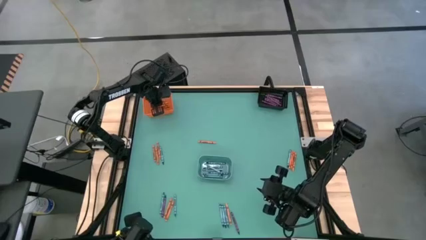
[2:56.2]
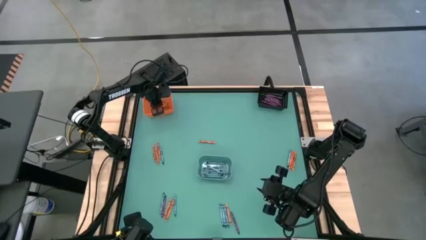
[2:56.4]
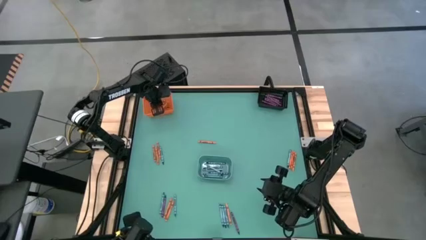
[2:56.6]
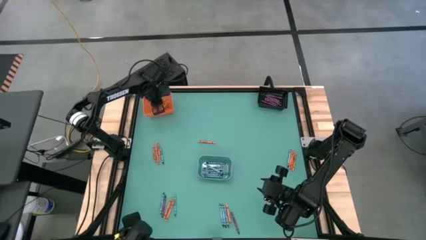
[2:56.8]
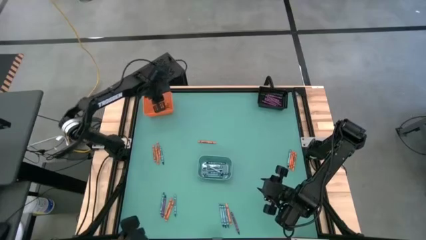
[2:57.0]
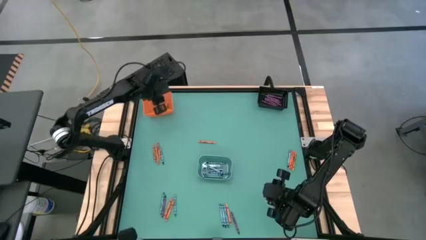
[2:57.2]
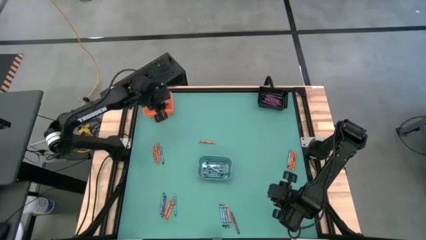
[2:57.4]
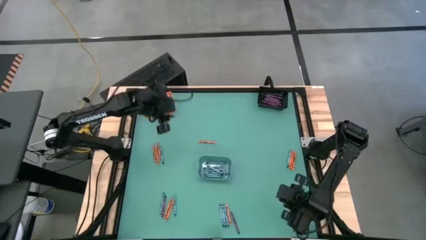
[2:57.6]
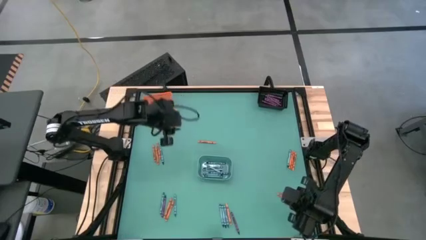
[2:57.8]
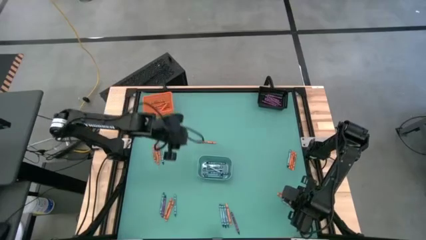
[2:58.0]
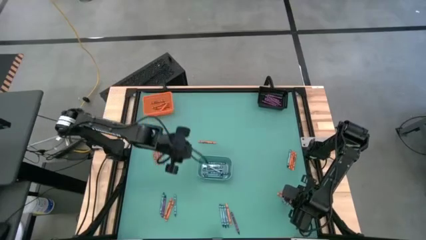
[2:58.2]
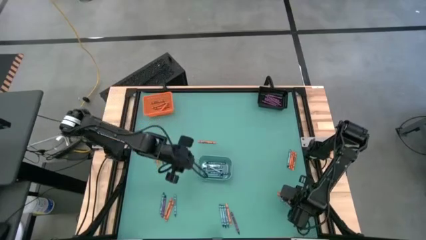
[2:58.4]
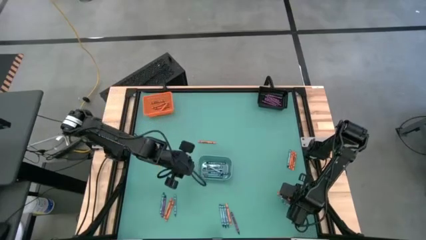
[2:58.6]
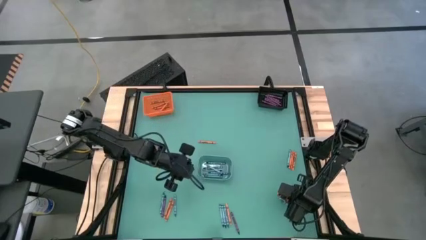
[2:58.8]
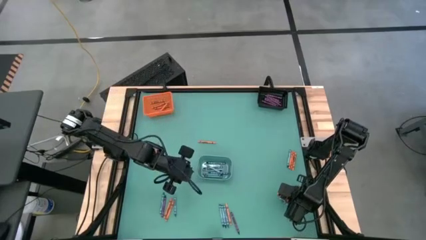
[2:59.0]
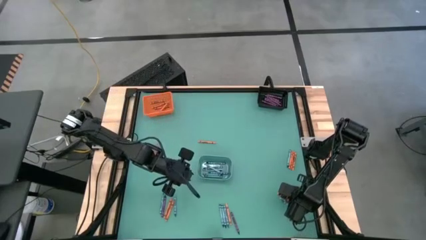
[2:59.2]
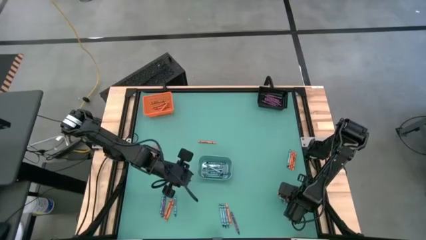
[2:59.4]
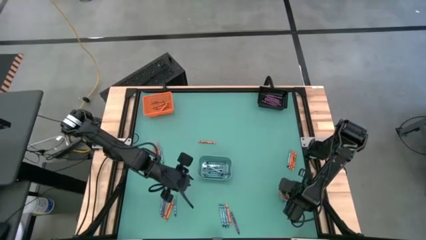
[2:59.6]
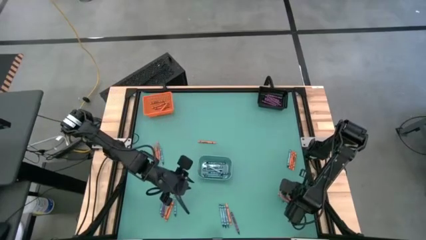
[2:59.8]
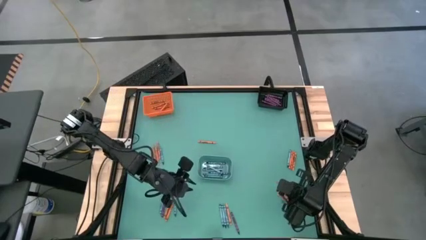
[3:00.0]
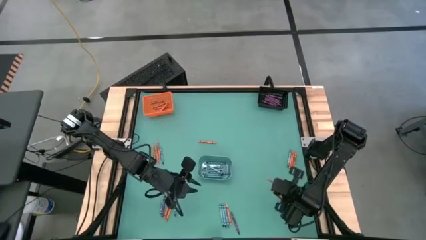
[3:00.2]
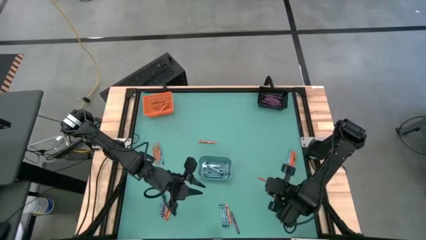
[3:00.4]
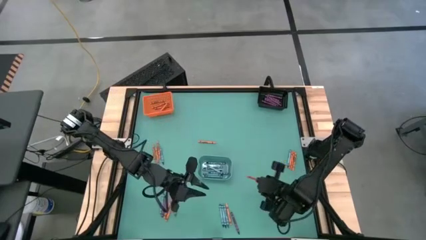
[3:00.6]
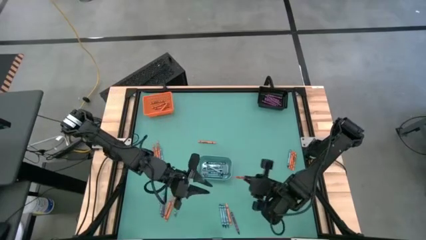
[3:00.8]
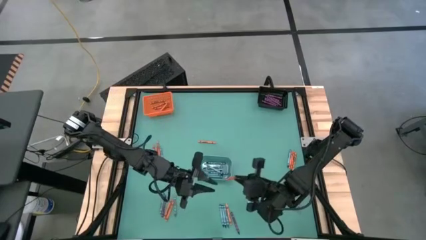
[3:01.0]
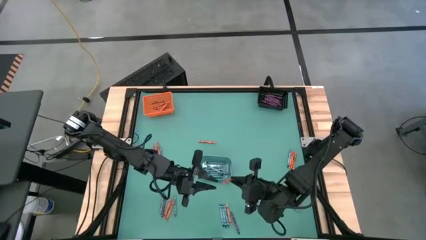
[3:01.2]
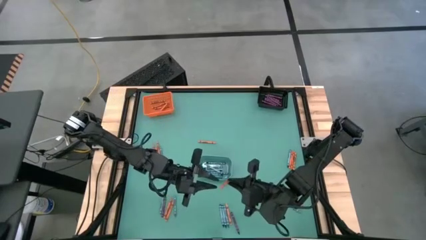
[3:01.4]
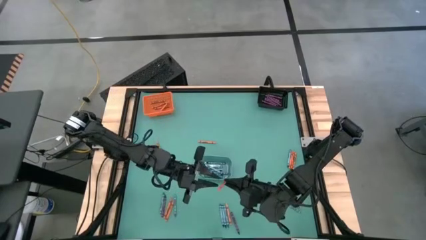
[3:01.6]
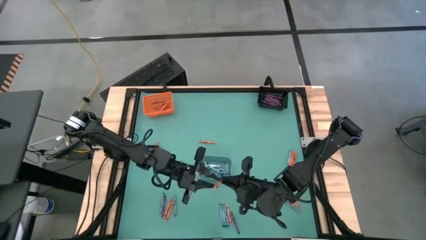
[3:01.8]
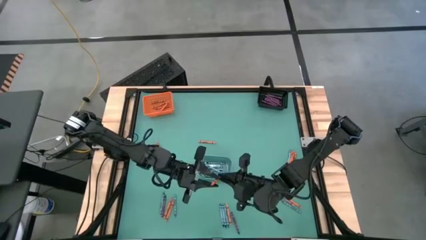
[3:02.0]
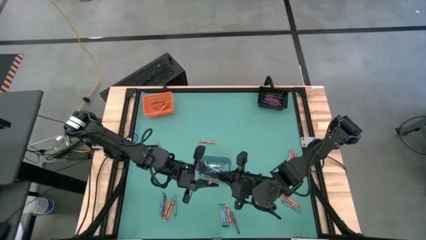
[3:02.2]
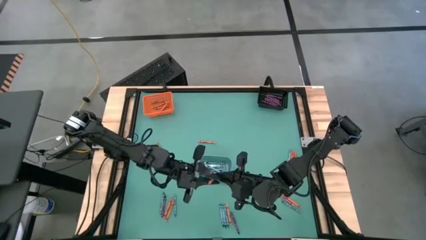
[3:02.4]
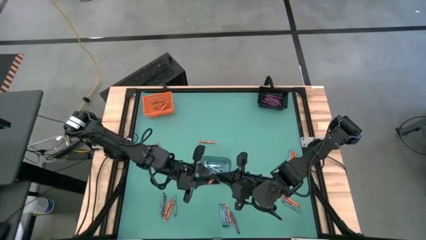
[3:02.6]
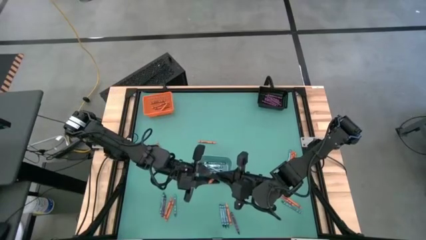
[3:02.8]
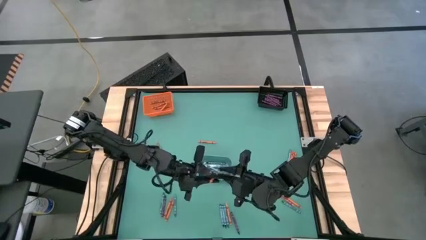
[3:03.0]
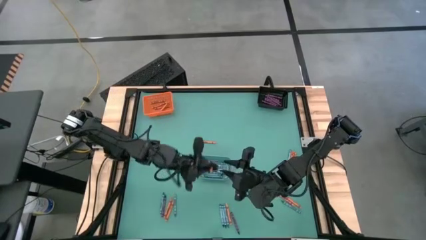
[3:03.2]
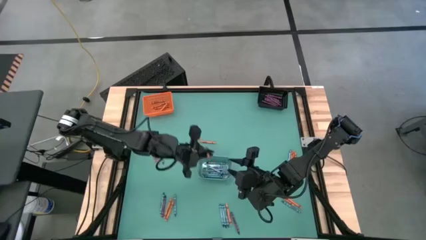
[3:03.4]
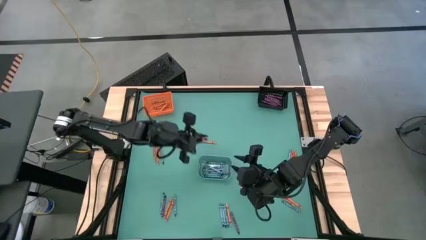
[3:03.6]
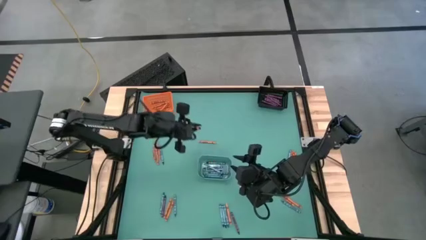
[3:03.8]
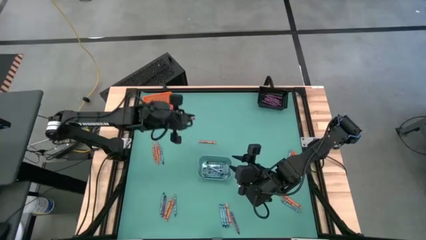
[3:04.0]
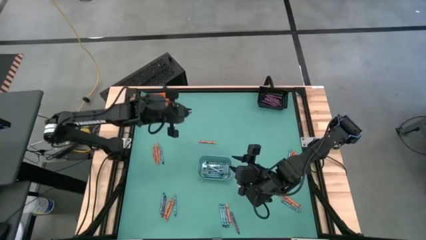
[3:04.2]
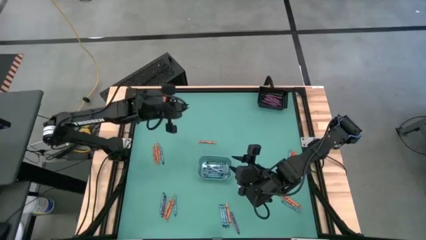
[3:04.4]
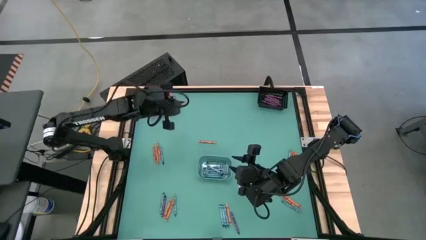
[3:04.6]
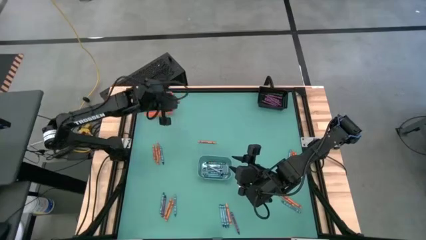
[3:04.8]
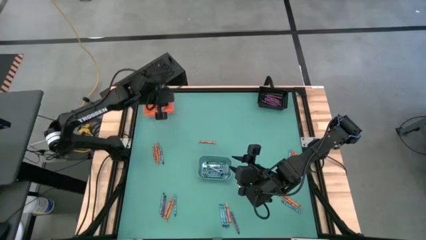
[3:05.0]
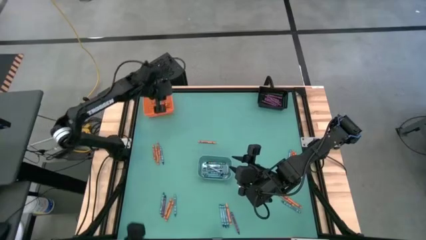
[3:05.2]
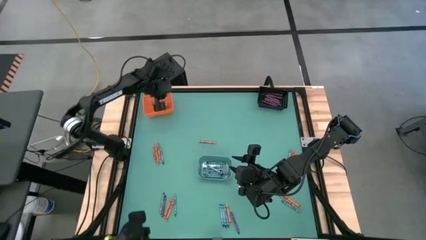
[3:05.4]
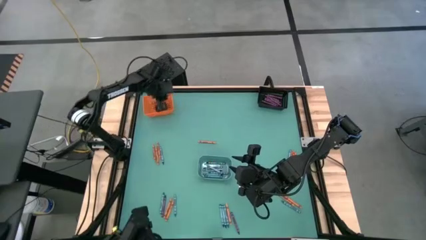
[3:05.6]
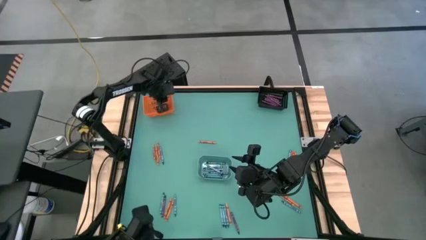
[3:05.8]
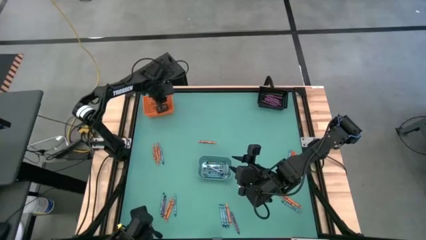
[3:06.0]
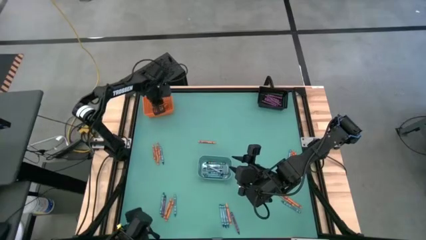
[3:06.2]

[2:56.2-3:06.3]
Task: Sort crayons
Put the orange crayon into the orange bin

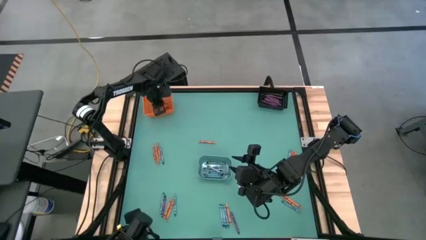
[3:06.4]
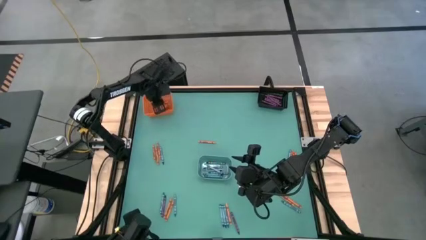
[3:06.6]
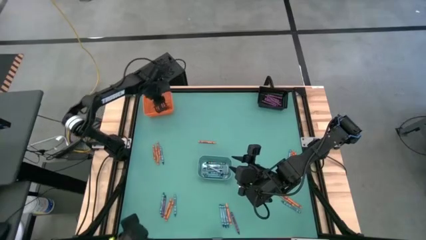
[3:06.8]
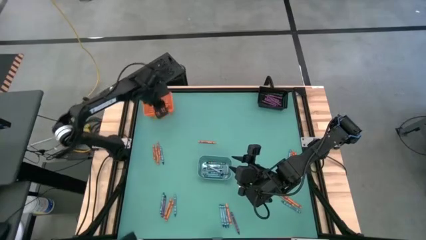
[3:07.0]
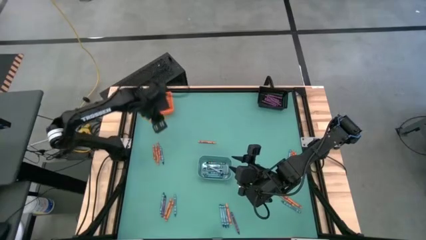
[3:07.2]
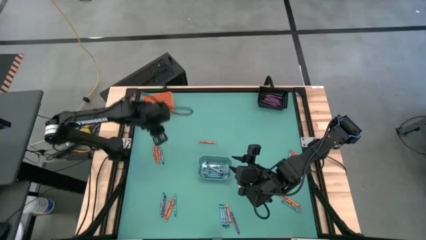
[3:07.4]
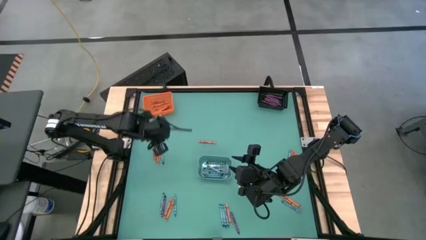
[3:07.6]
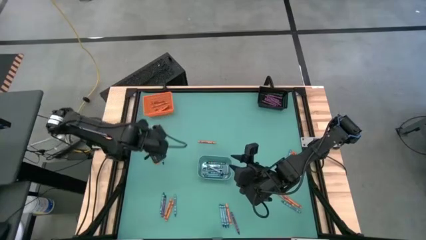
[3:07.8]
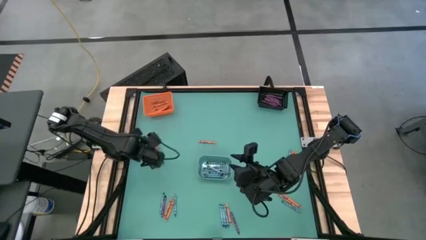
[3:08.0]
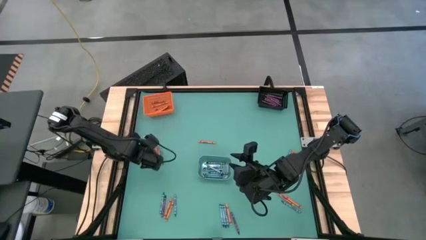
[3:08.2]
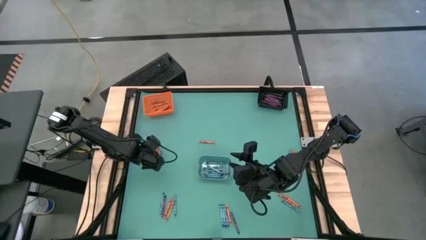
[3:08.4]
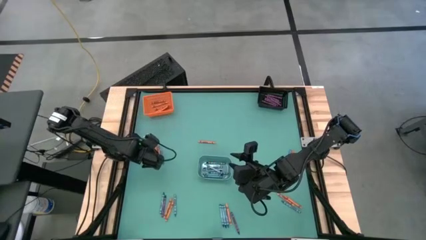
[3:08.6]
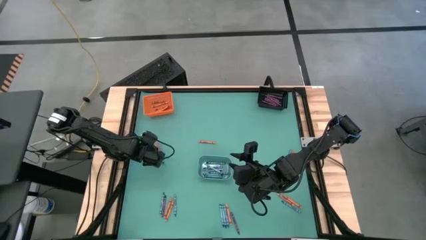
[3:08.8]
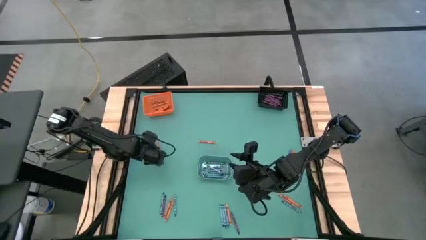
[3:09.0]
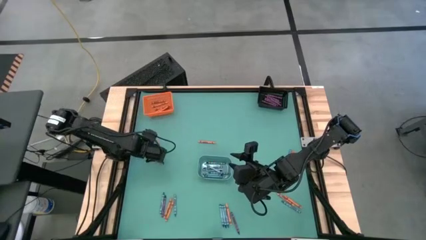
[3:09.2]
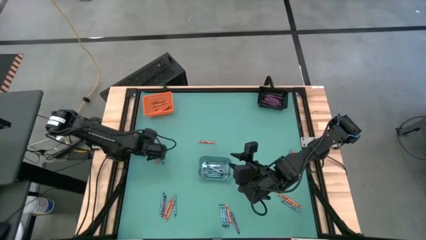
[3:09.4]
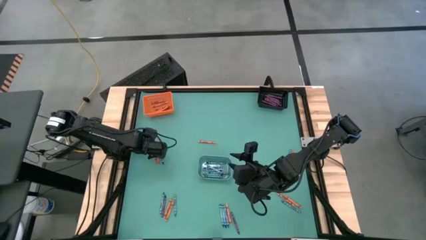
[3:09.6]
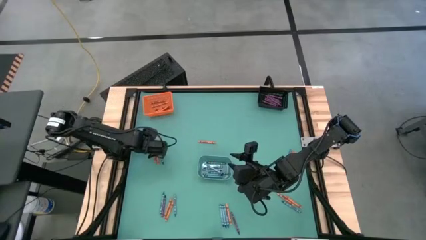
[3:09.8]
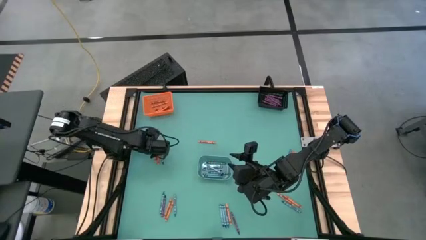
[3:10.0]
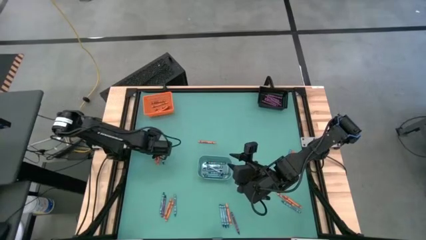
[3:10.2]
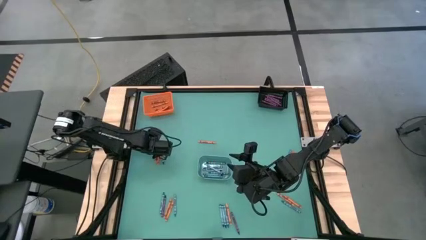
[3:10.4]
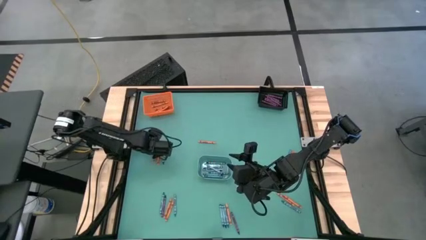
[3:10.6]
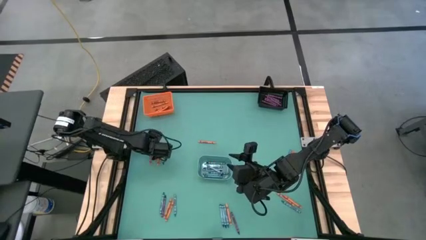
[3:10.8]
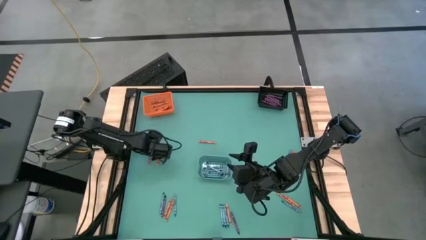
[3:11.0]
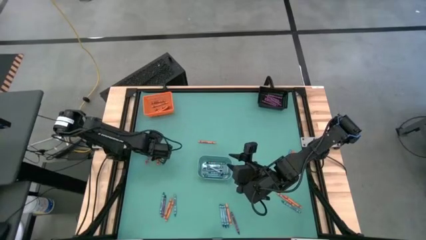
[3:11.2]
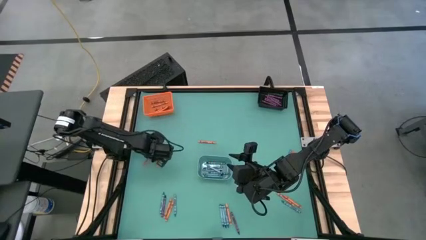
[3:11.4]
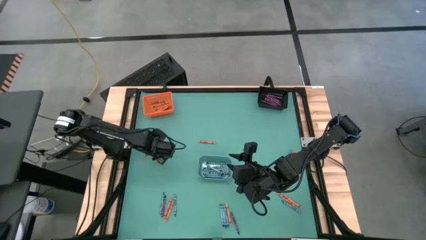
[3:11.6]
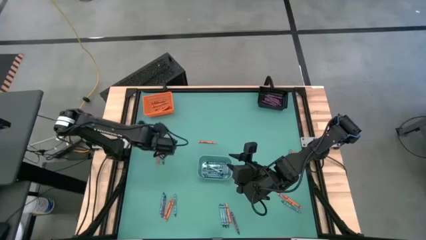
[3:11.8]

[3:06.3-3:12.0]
Put the orange crayon into the orange bin

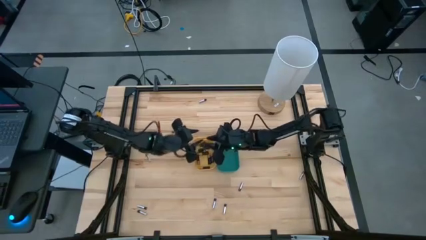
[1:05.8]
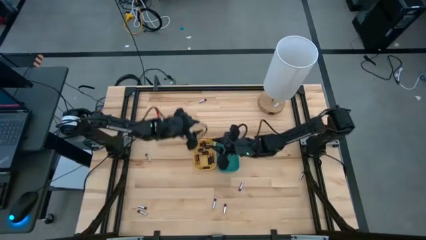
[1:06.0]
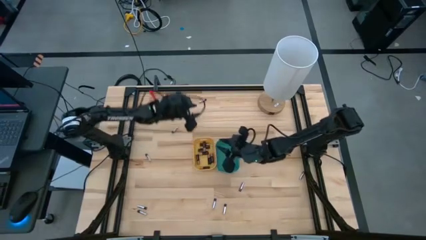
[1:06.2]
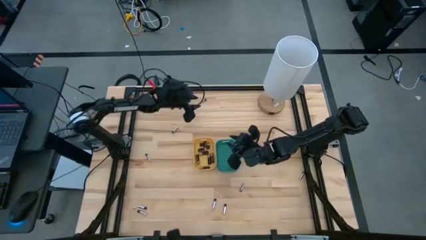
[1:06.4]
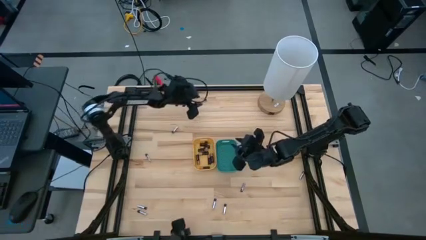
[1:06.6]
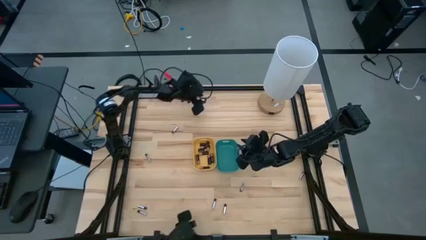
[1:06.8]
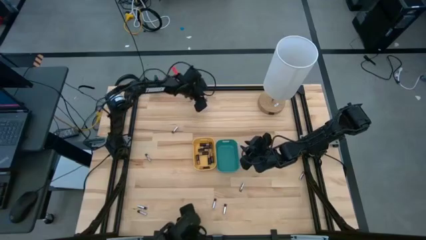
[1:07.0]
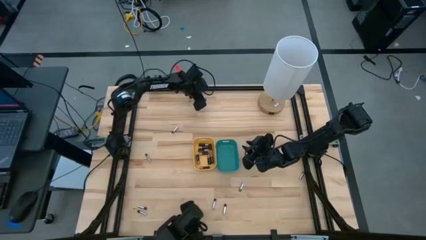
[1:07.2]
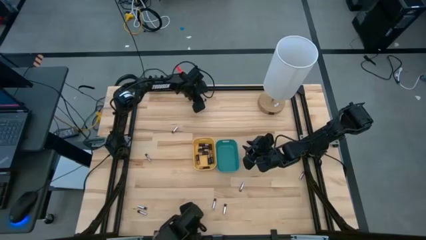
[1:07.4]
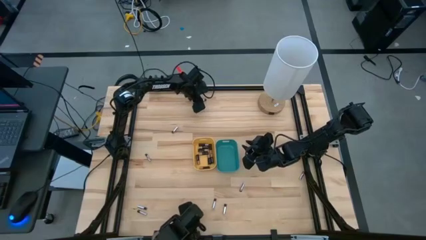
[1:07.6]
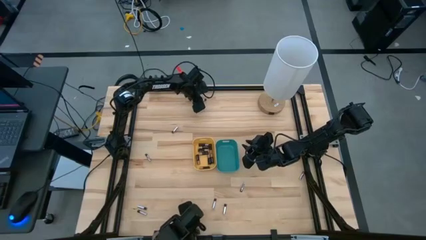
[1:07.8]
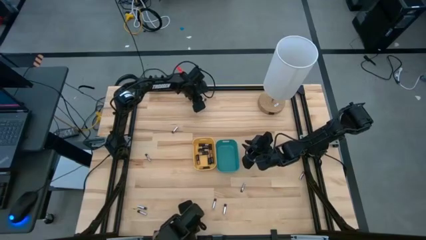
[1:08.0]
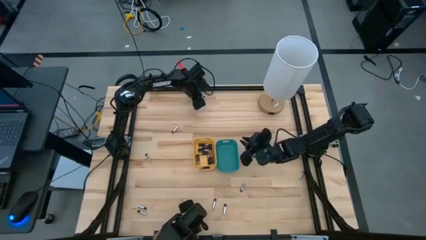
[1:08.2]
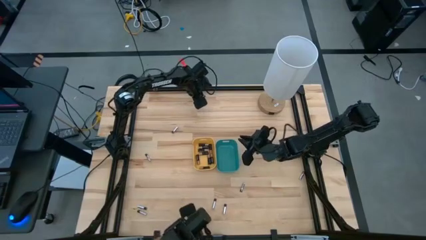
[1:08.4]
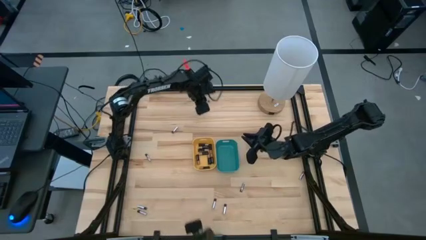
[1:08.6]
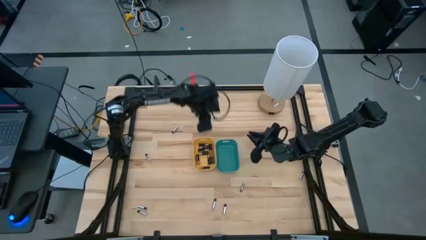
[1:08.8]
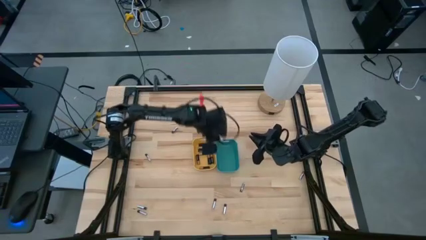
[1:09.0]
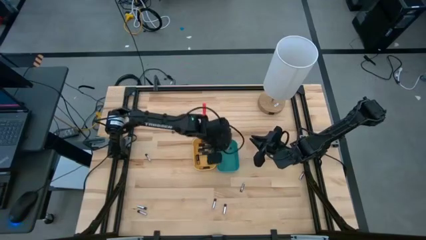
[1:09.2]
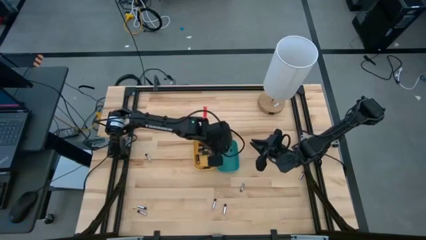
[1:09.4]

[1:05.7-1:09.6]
Task: Sort batteries
Put the silver battery into the green bin
